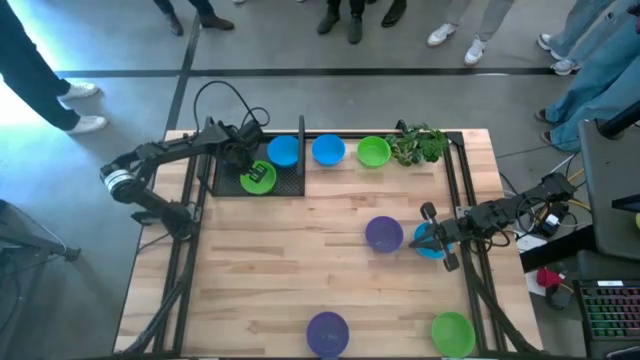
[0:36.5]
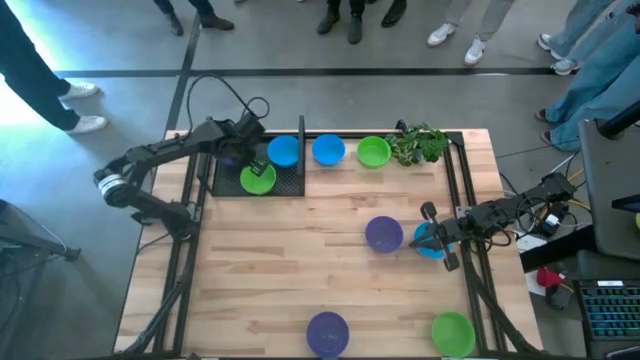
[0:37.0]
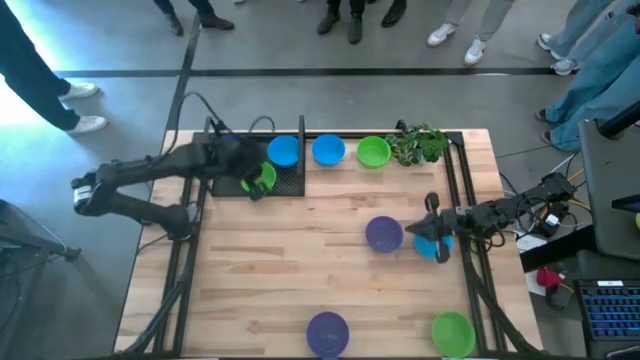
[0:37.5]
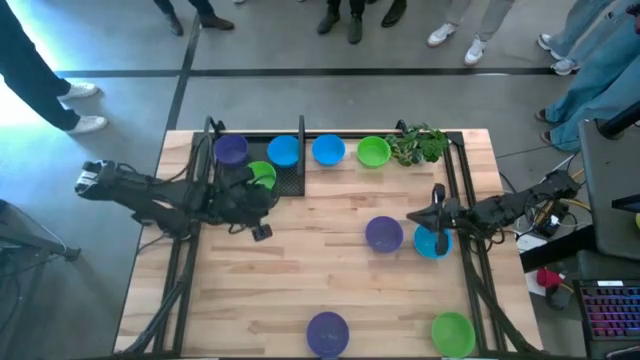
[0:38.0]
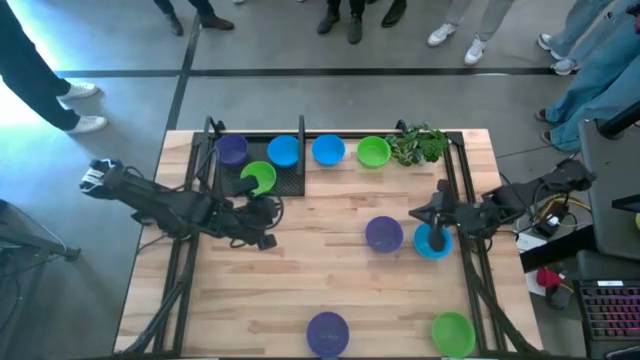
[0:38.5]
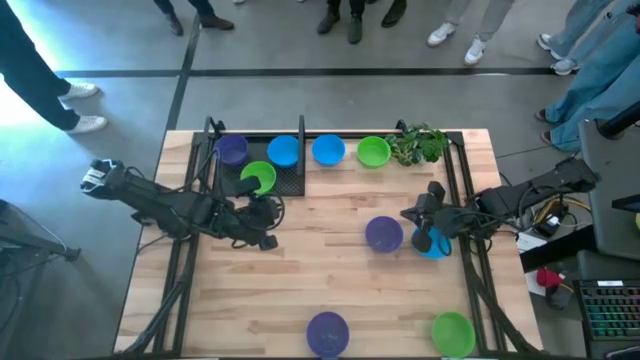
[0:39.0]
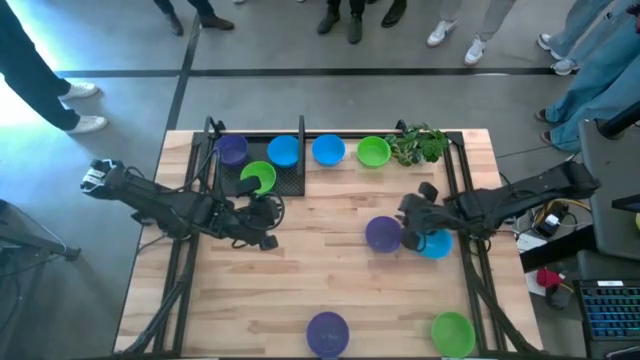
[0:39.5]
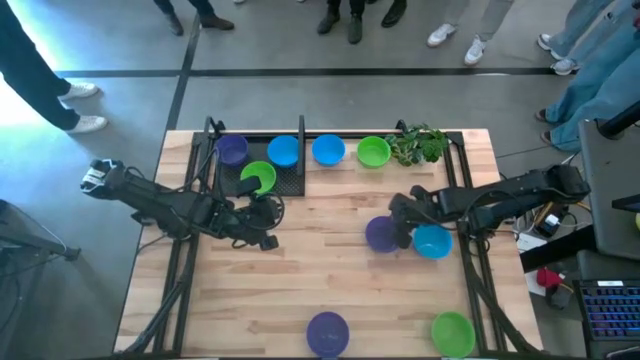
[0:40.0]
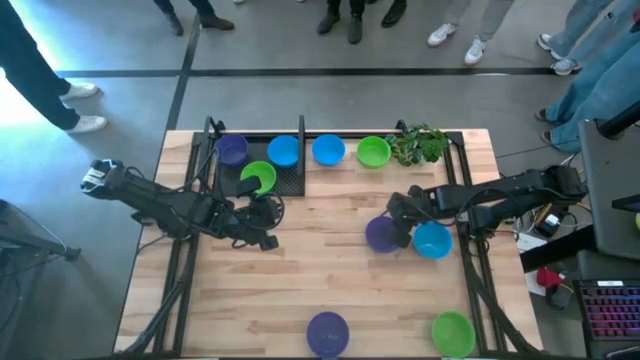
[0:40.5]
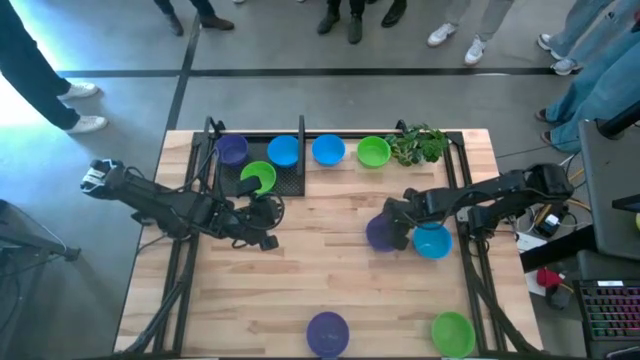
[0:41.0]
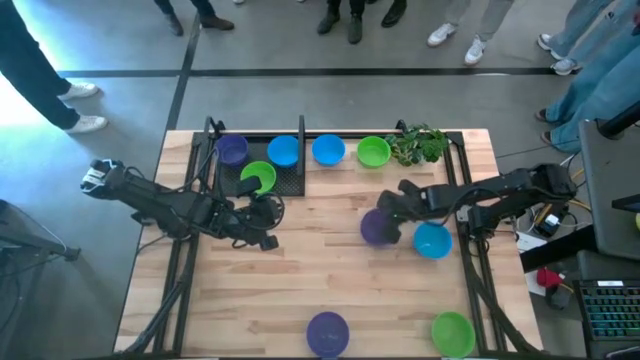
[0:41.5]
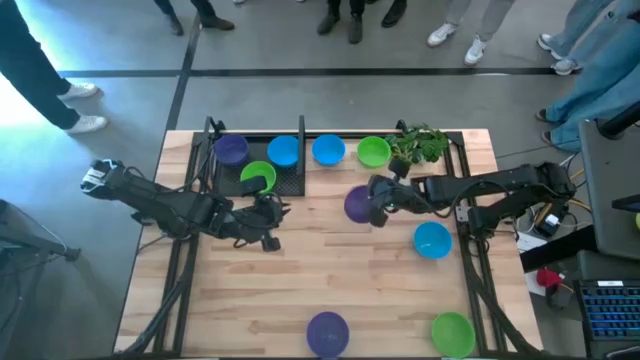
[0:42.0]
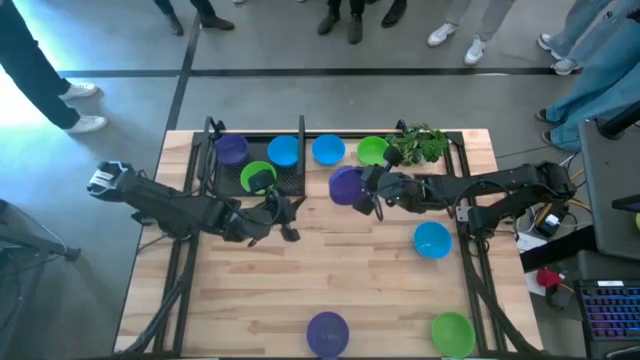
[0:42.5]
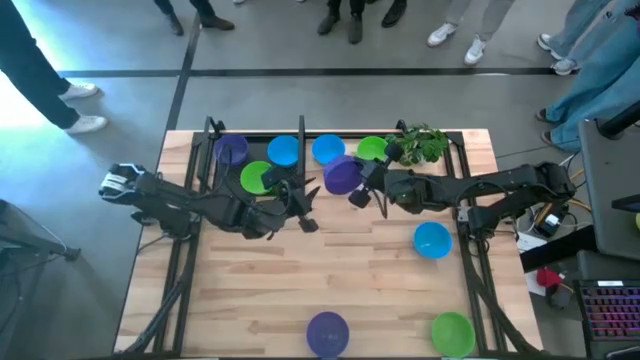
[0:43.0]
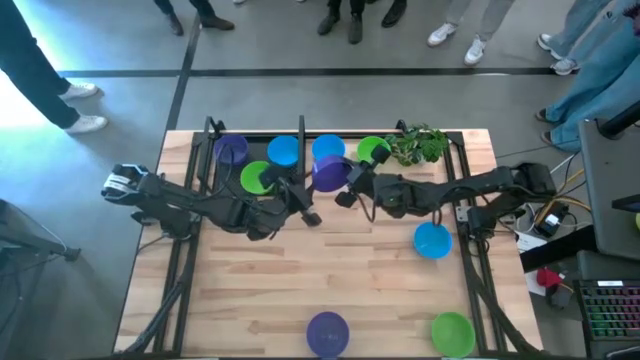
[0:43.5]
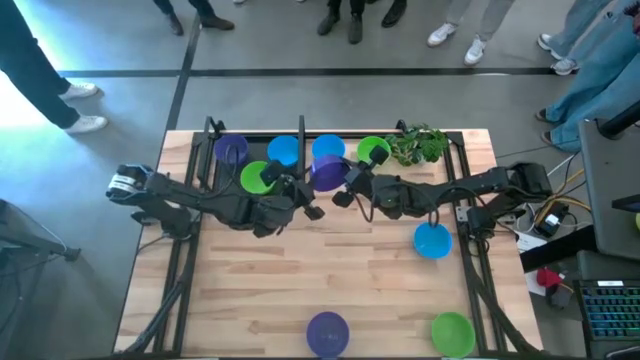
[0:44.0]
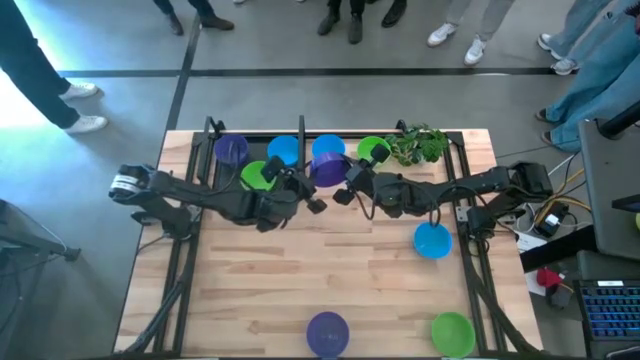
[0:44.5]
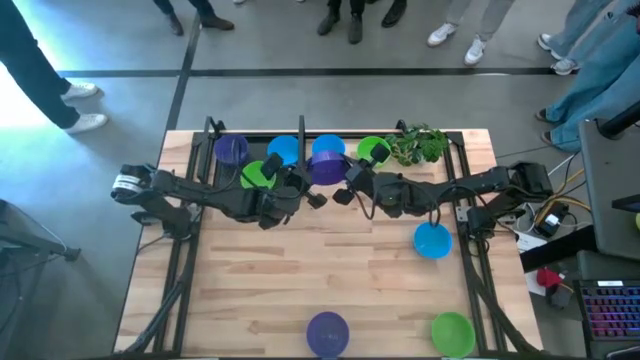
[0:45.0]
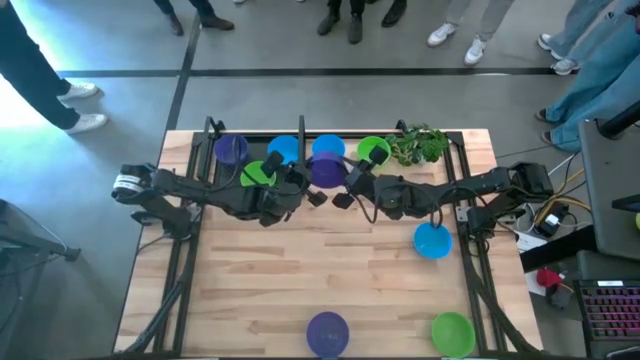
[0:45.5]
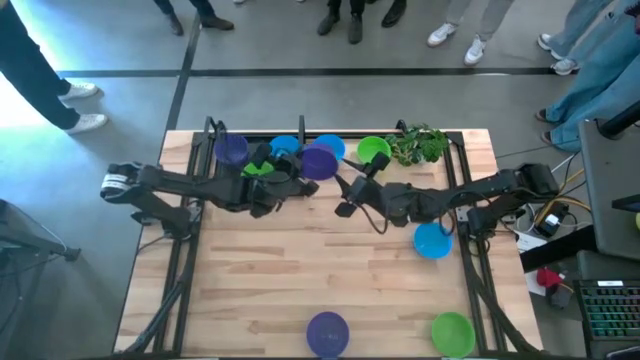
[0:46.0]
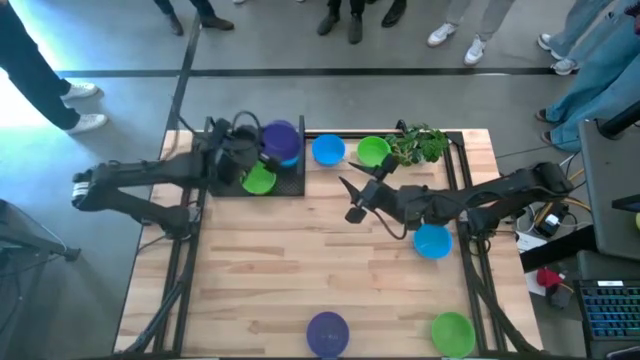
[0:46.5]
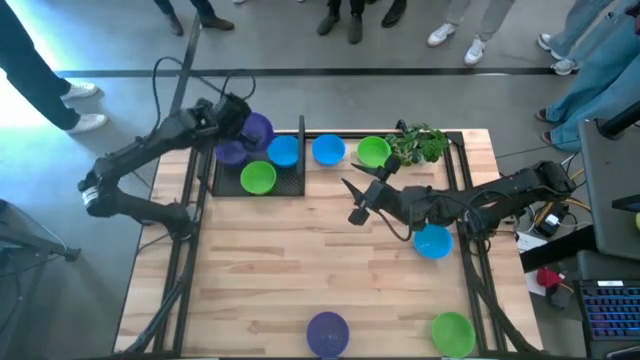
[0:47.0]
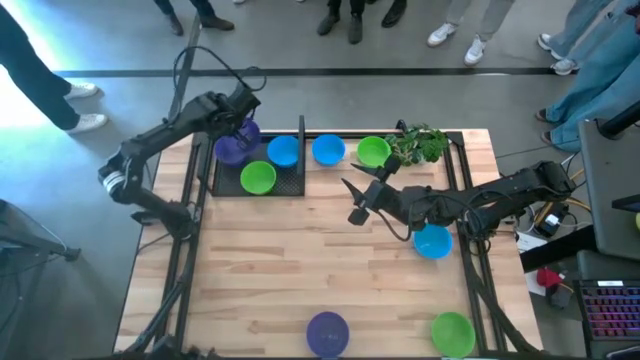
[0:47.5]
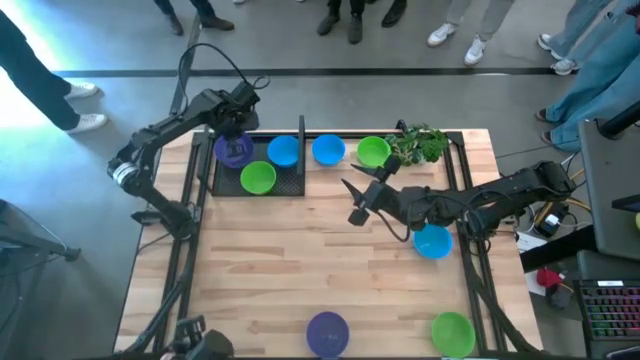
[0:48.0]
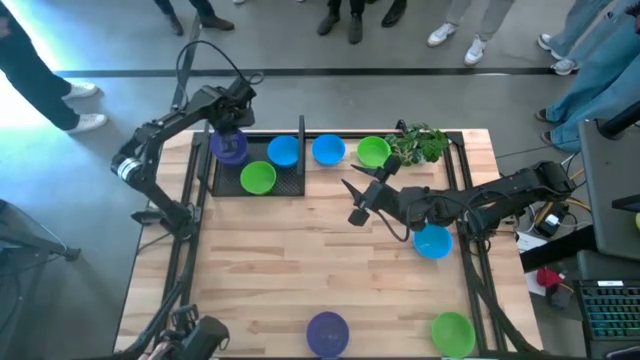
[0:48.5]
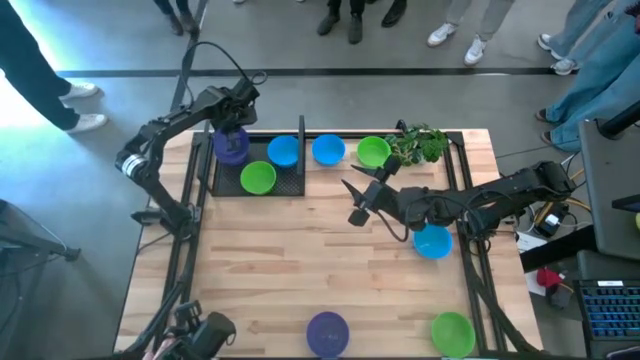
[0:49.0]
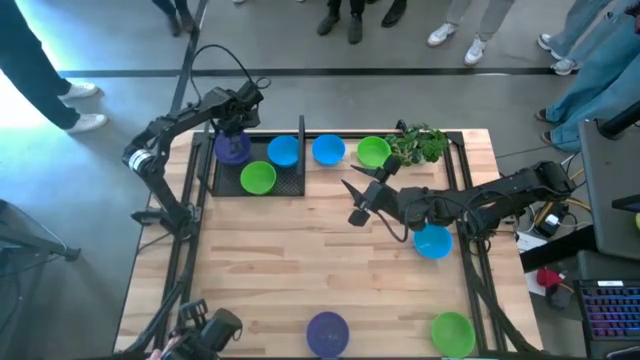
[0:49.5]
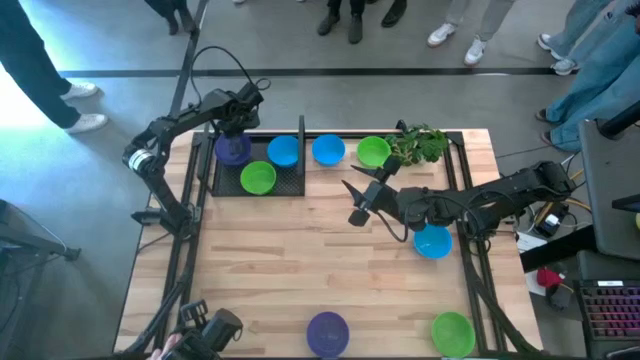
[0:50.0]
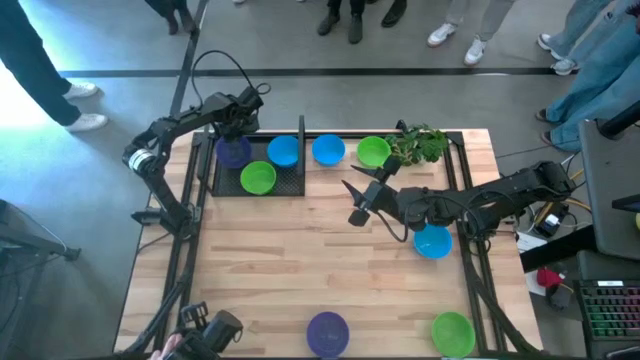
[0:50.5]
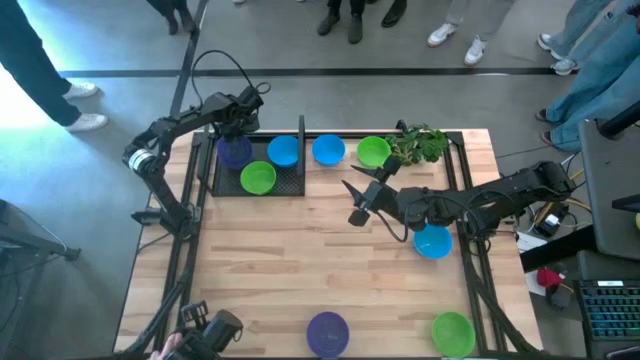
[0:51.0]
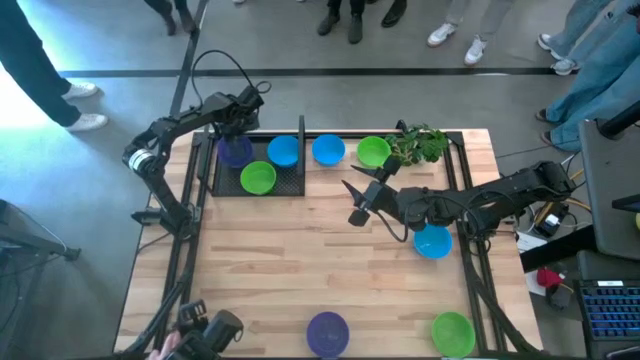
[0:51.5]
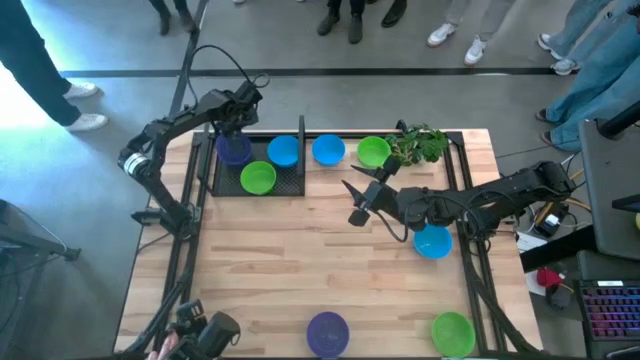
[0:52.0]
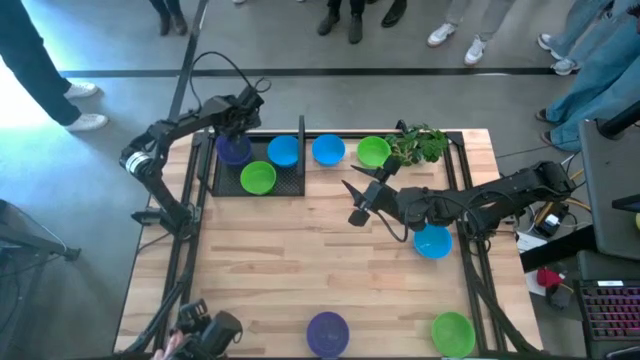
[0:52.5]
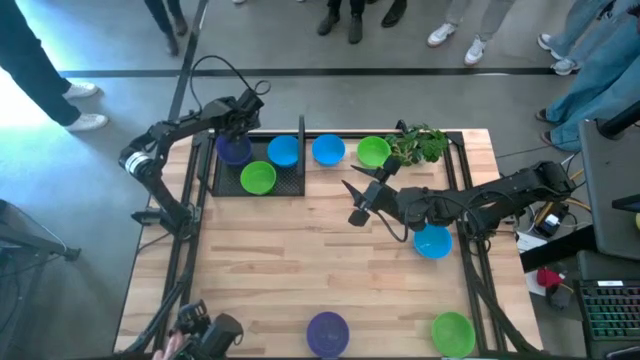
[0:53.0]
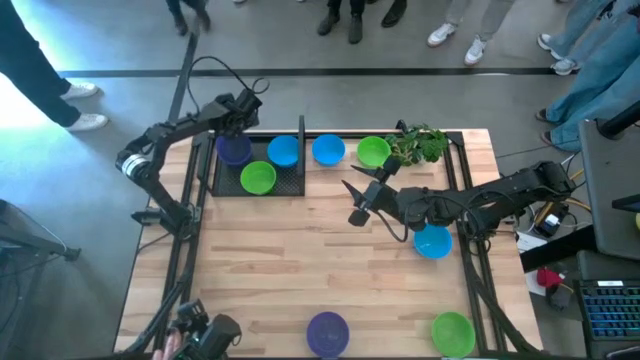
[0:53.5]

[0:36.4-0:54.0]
Task: Pick & Place Mini bowls
Stack the top purple bowl on the purple bowl on the shelf
